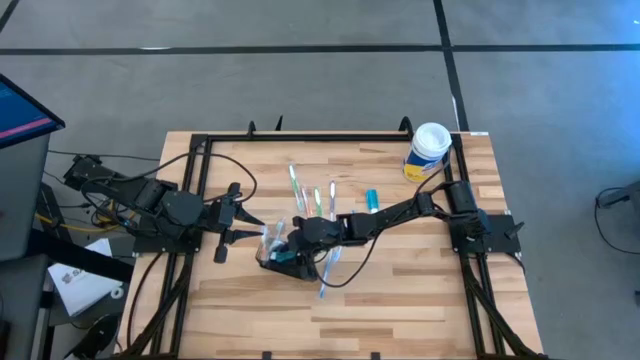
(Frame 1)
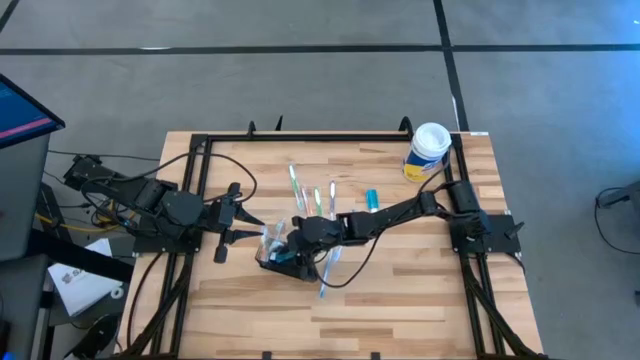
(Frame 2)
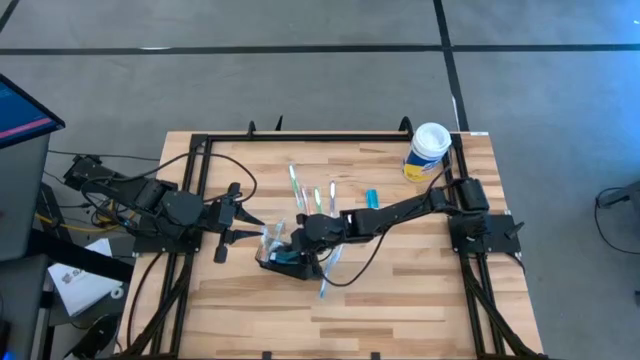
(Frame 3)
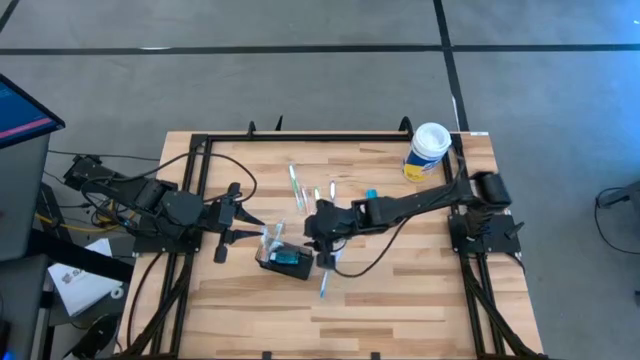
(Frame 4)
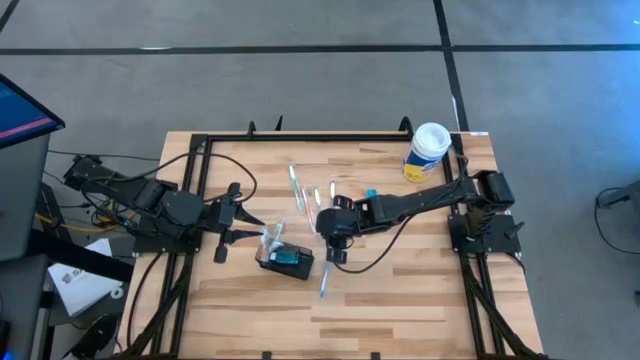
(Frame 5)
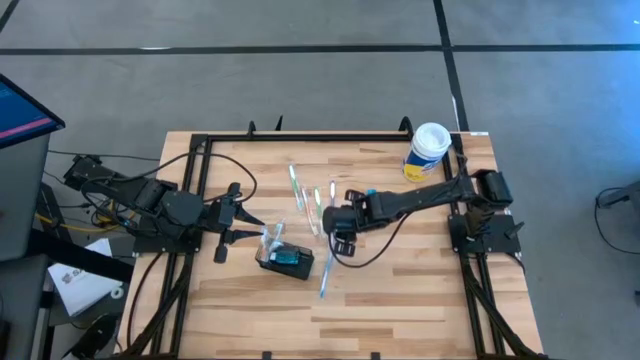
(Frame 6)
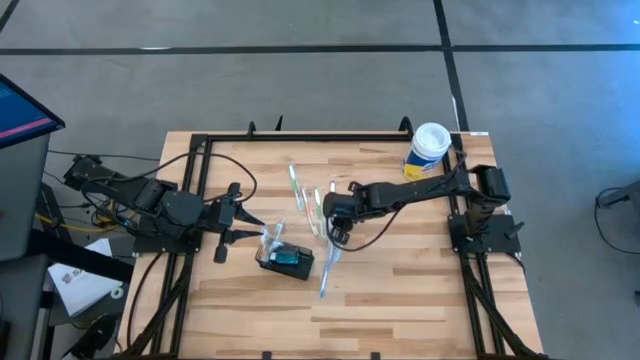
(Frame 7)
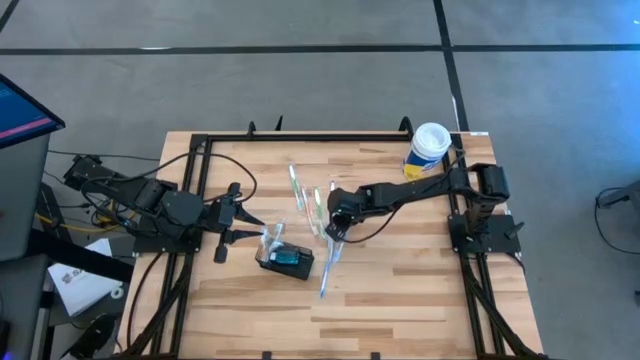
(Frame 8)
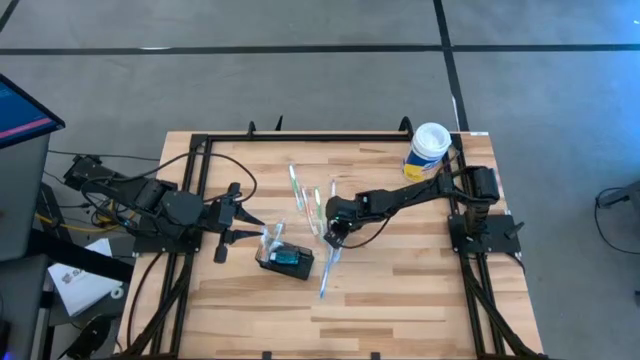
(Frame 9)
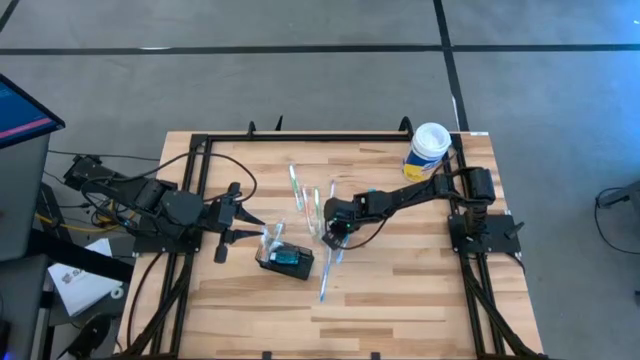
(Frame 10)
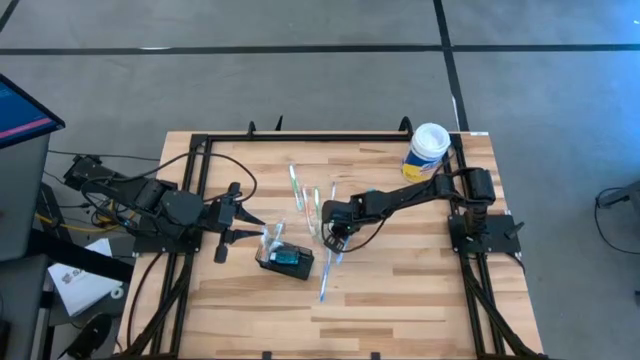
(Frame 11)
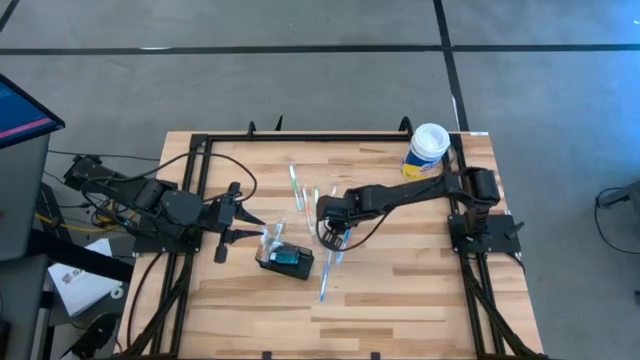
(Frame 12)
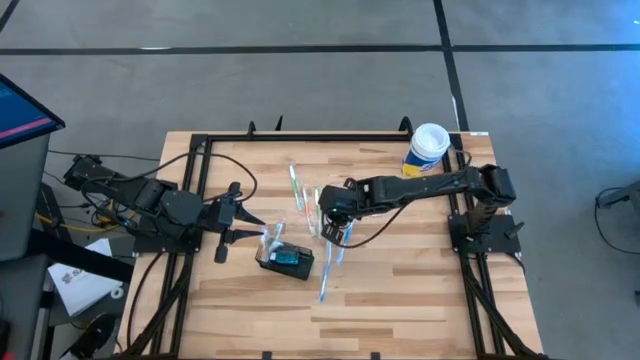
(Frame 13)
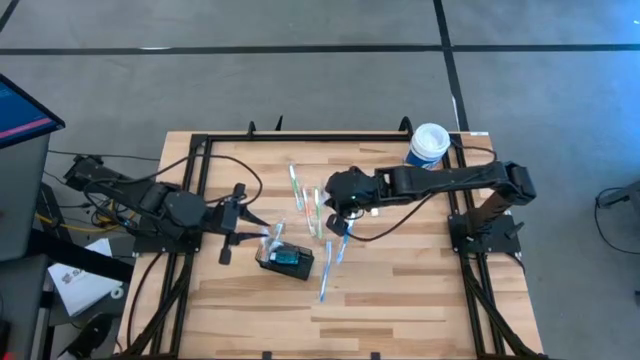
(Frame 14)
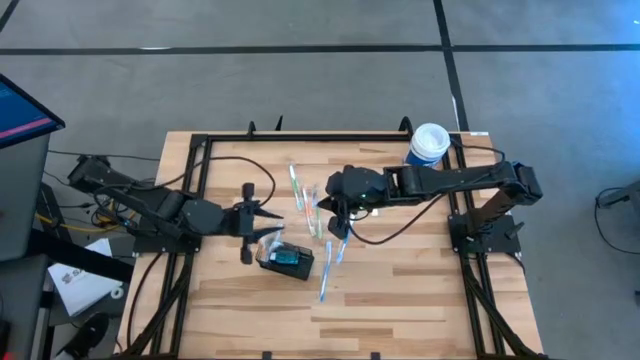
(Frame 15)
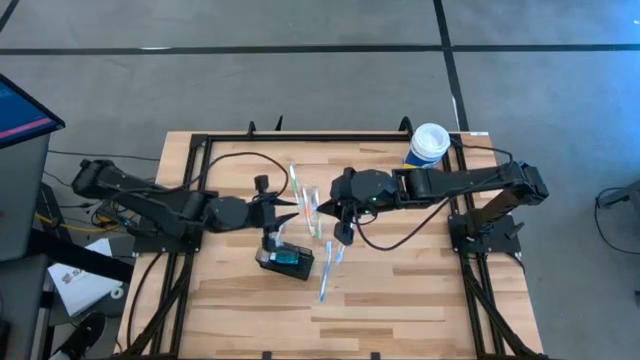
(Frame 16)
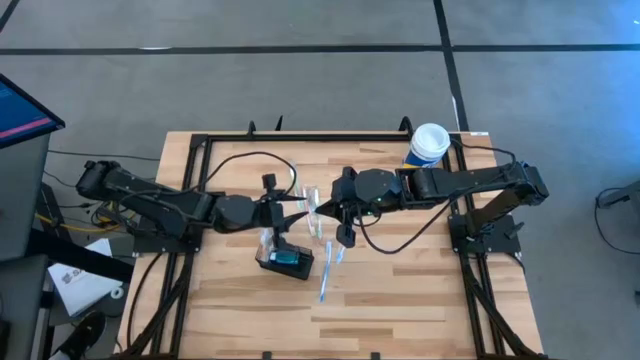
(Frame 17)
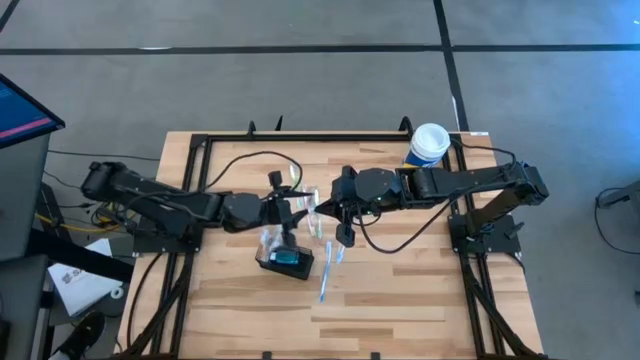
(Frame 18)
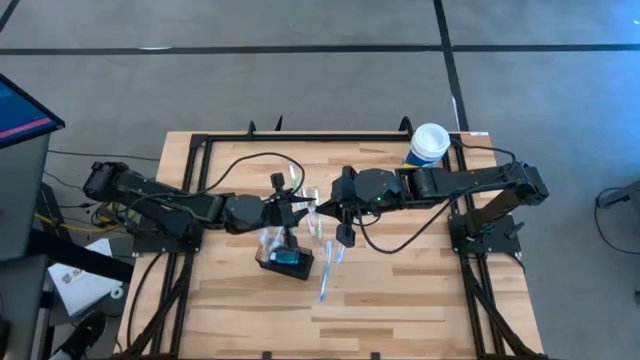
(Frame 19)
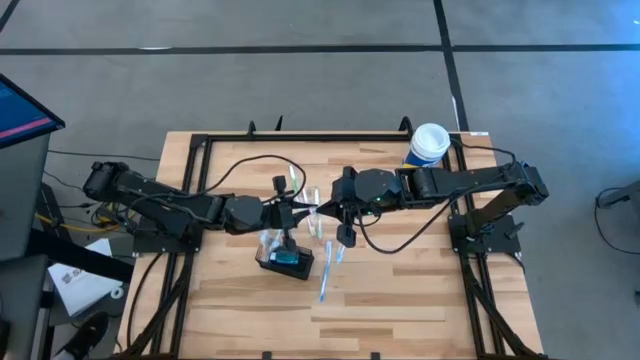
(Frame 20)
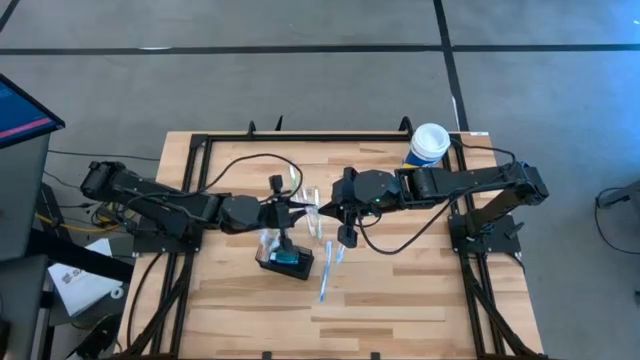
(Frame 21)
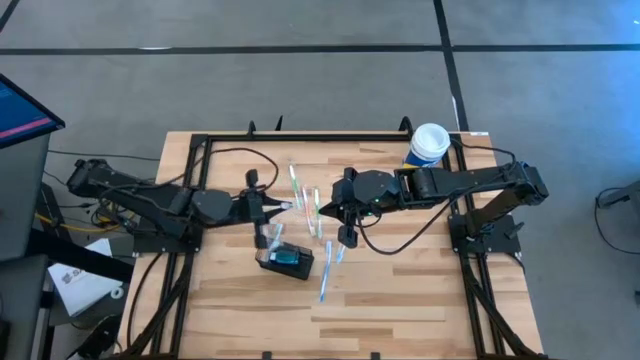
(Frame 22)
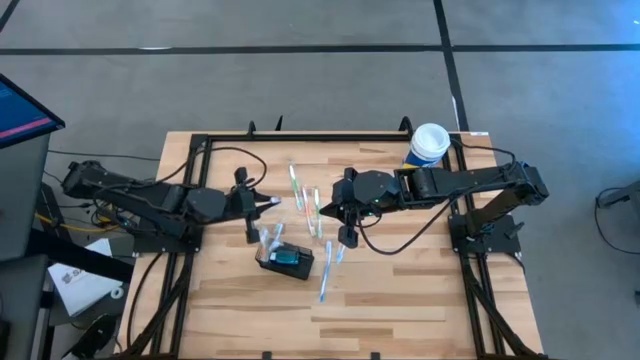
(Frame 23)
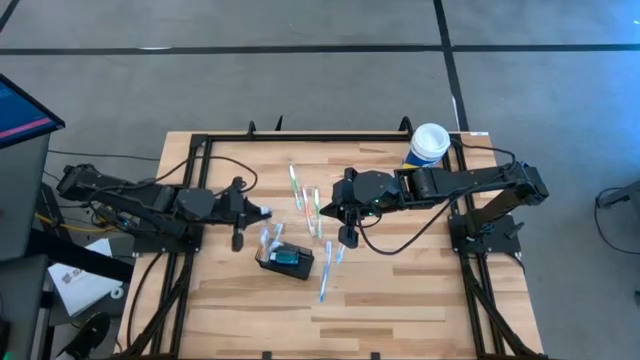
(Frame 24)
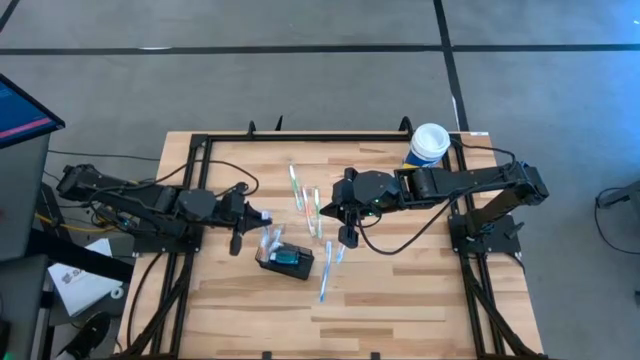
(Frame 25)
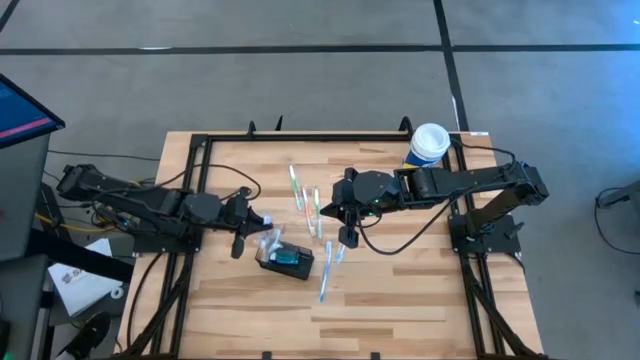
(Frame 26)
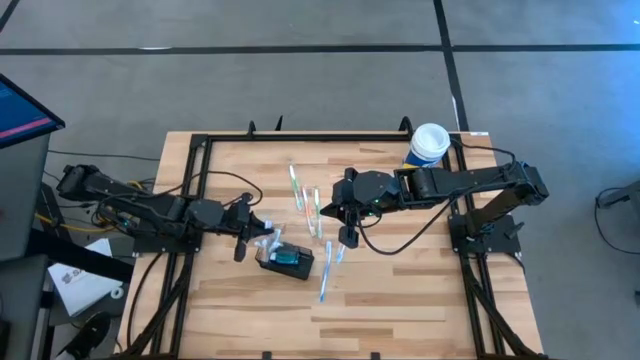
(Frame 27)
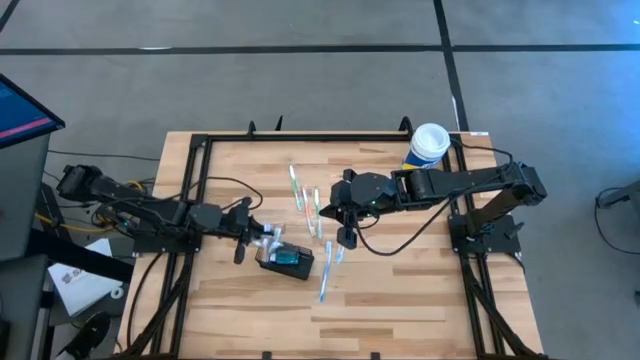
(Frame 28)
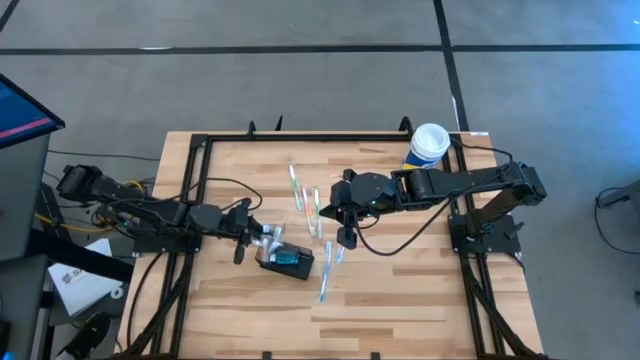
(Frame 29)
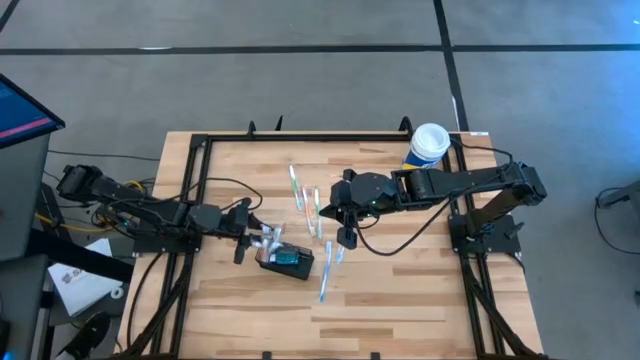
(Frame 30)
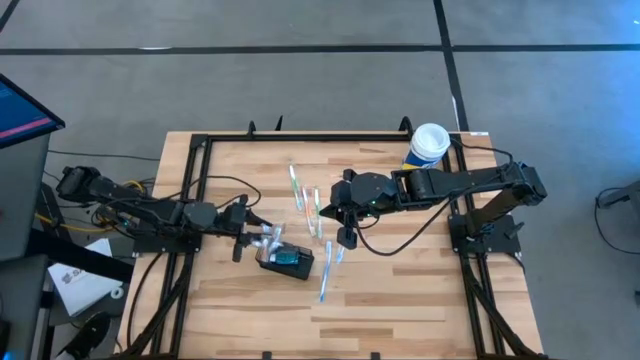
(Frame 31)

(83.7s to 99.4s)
Task: Pick & Place toothbrushing station
Put the purple toothbrush into the wire organizer

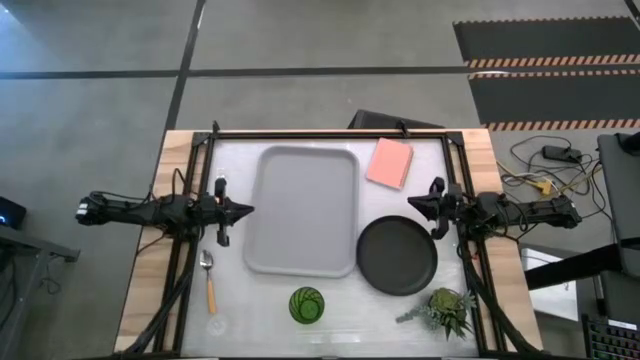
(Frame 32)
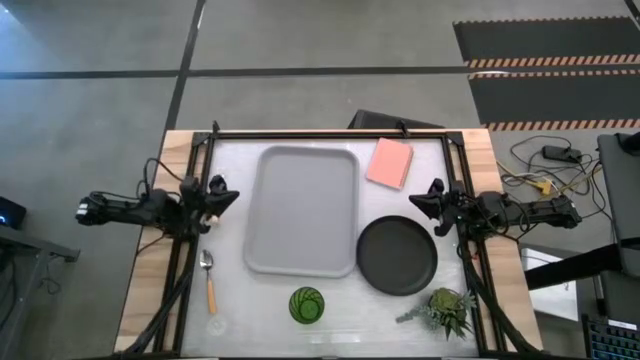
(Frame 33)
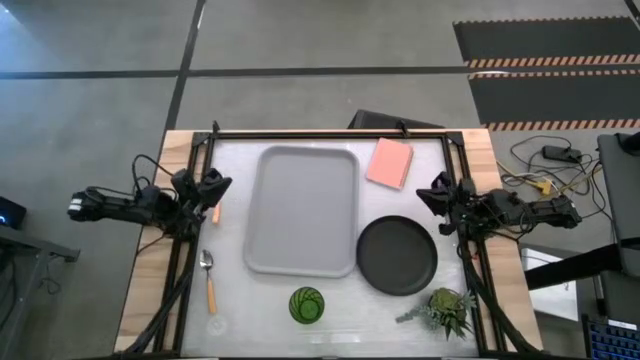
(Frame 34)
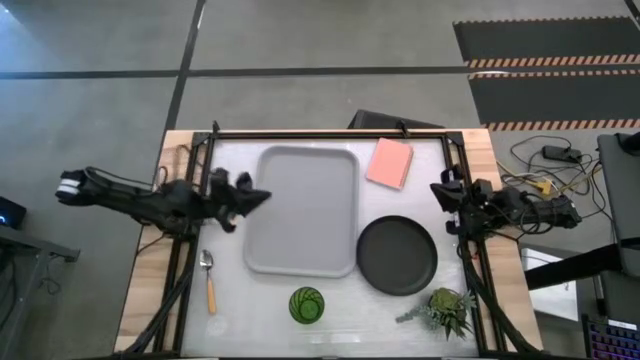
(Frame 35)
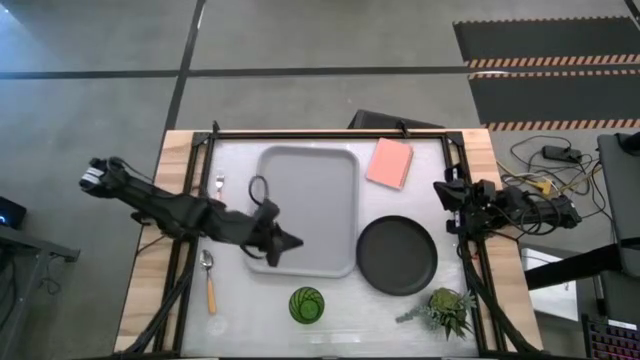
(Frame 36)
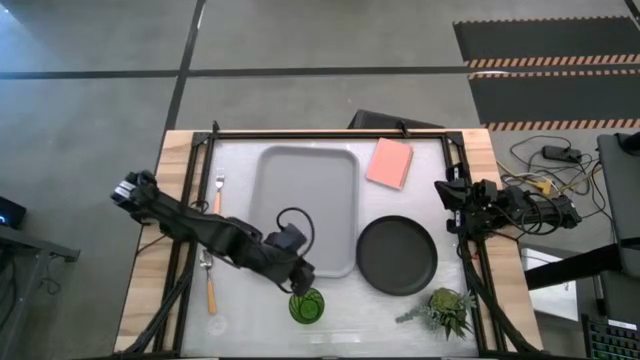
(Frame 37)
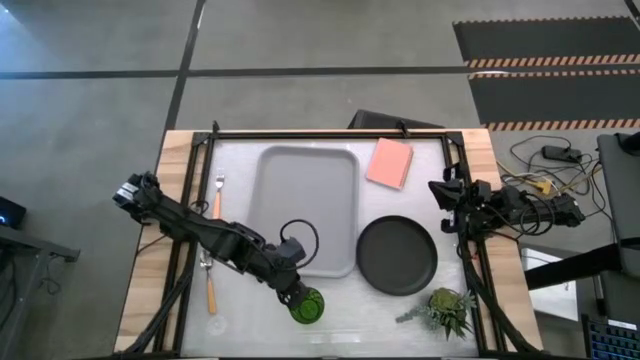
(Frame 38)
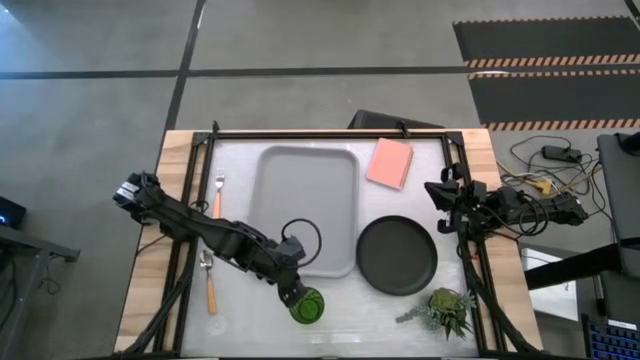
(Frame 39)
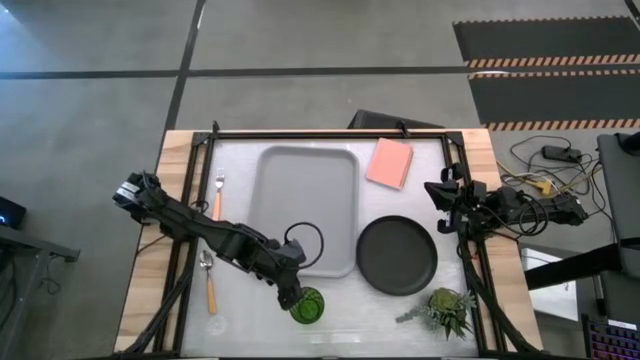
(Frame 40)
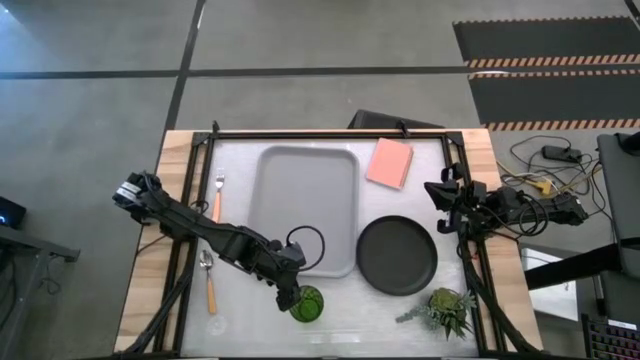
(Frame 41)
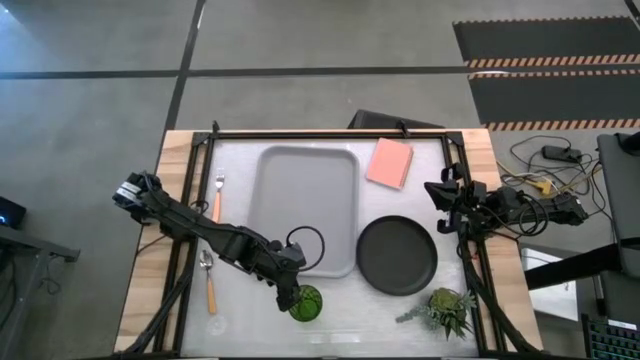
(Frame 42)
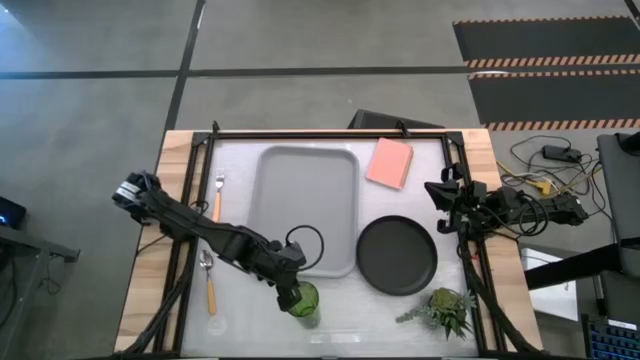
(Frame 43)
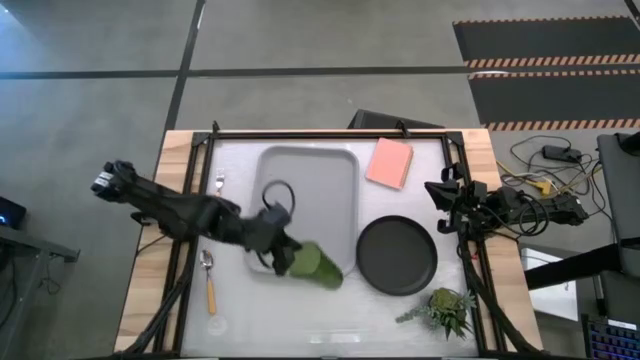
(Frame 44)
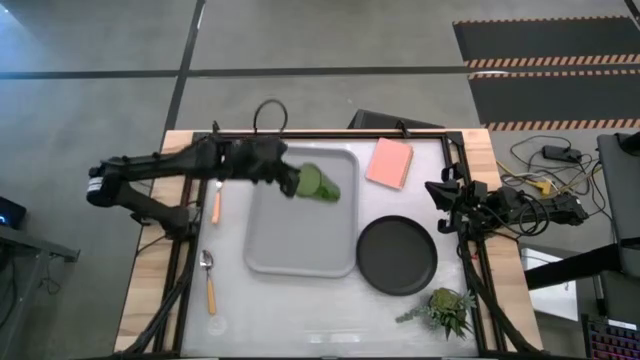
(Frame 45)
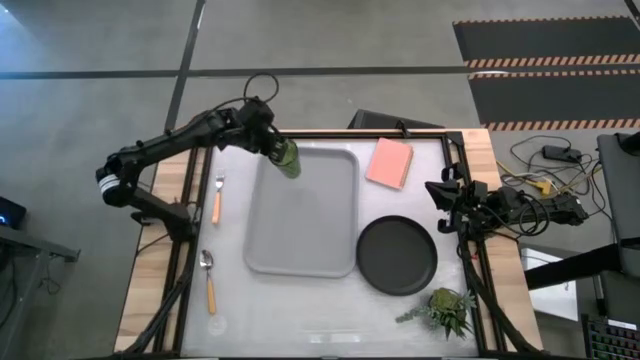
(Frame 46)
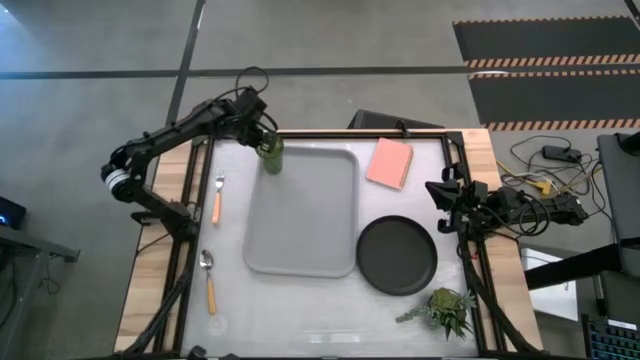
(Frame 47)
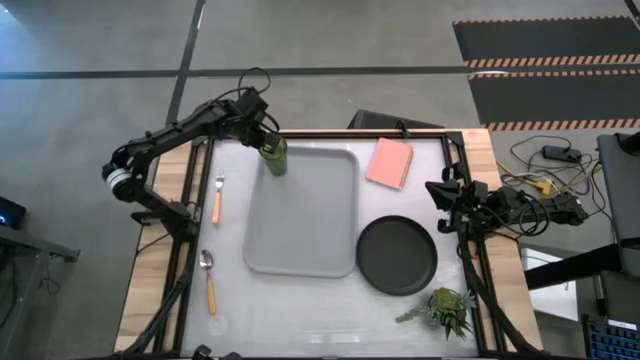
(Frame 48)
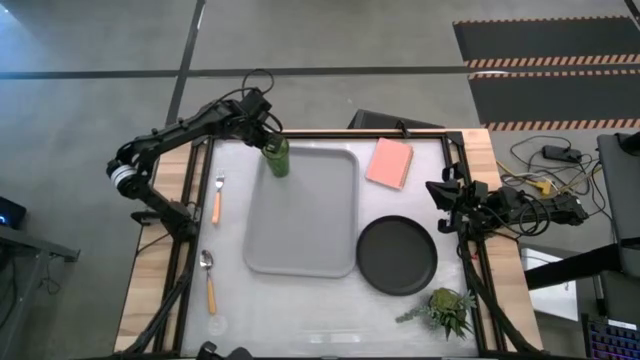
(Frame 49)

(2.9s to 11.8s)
Task: Pick and place plate/cup/fork/spoon on tray
Put the green cup on the gray serving tray
